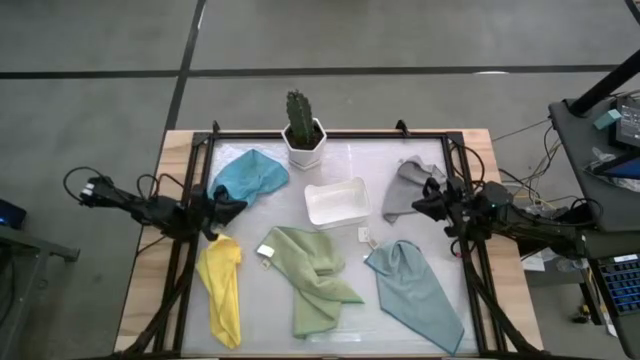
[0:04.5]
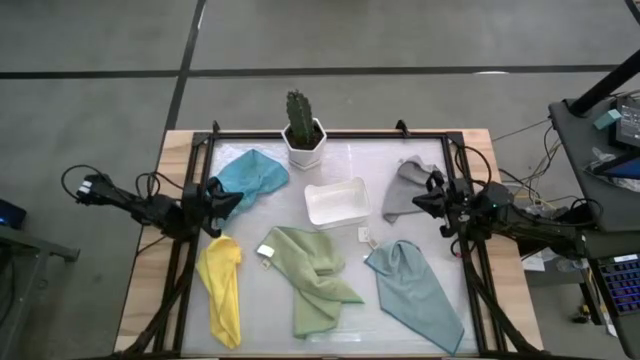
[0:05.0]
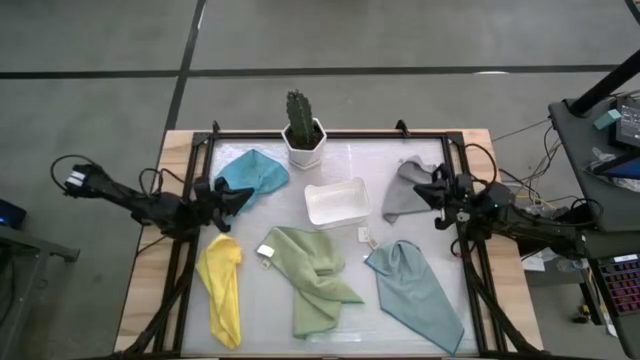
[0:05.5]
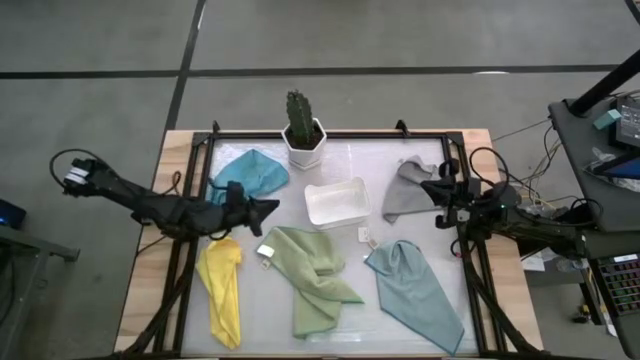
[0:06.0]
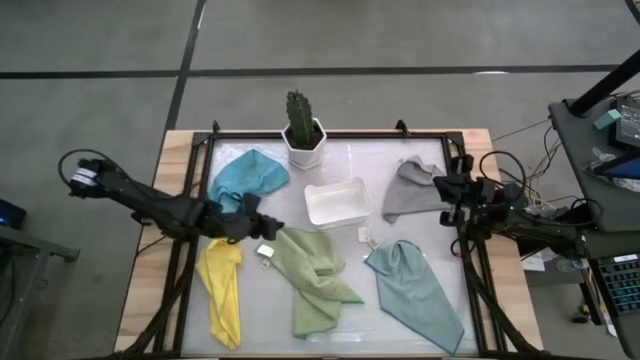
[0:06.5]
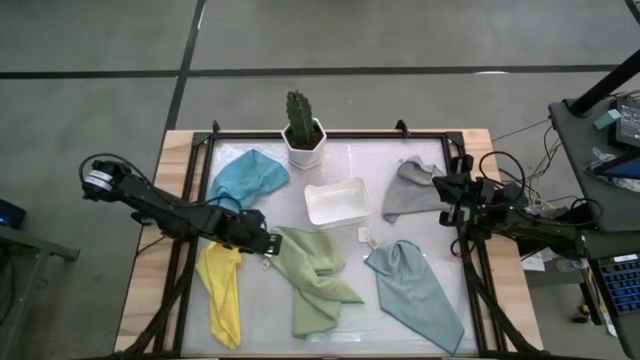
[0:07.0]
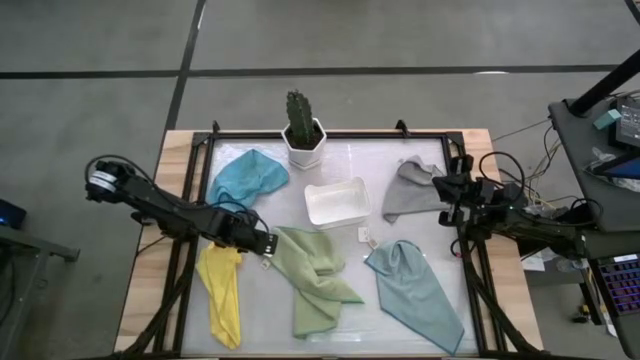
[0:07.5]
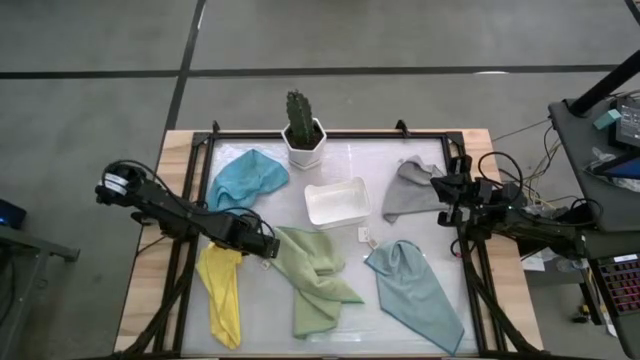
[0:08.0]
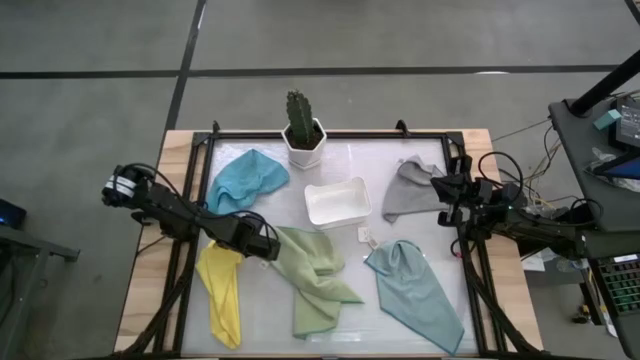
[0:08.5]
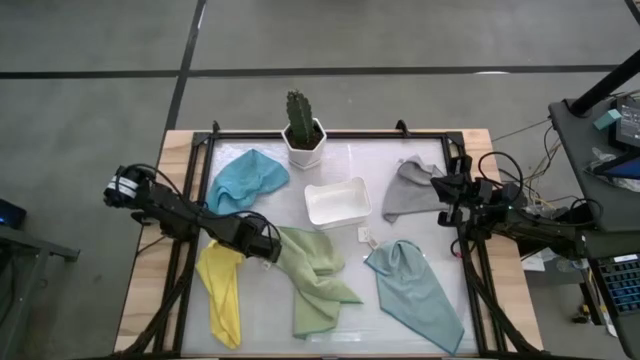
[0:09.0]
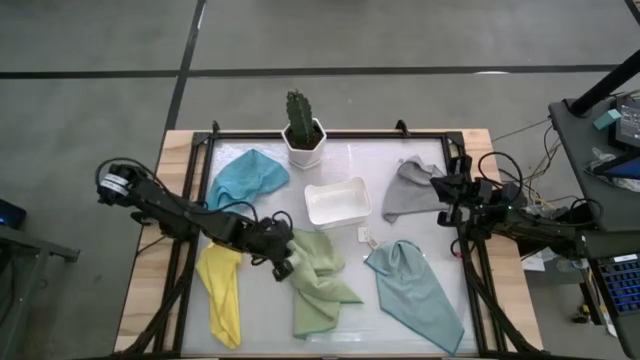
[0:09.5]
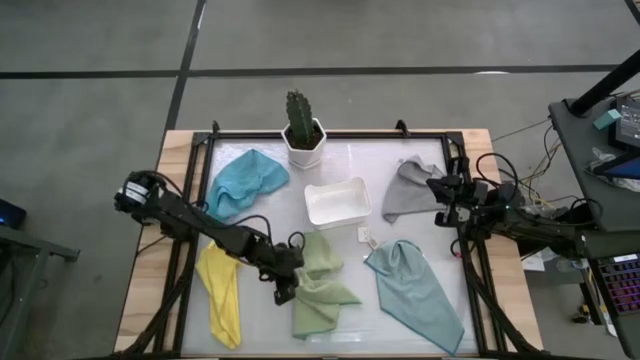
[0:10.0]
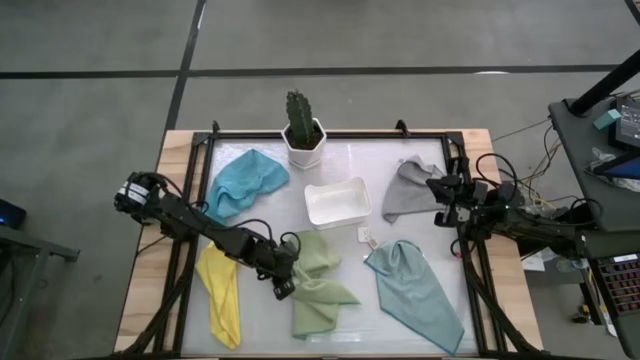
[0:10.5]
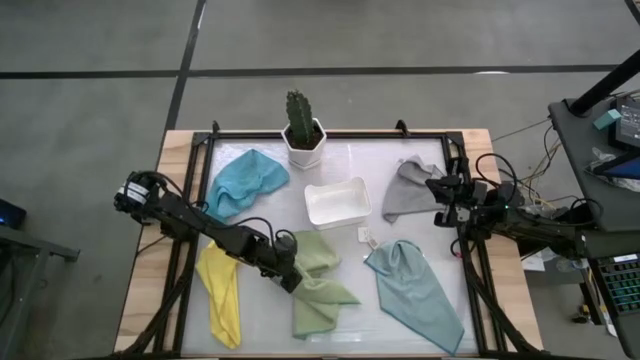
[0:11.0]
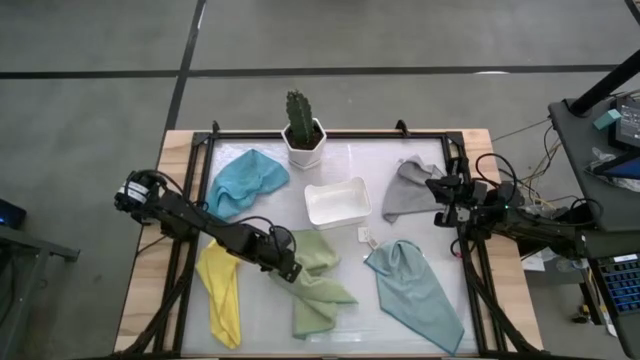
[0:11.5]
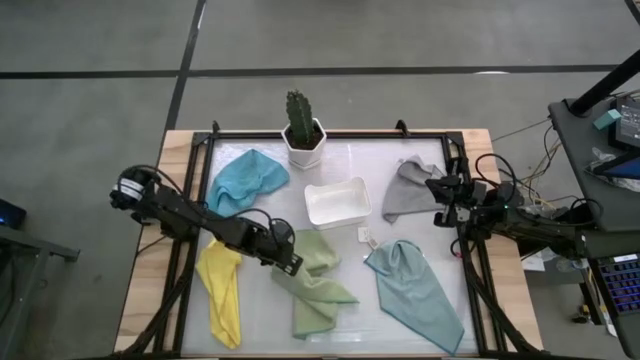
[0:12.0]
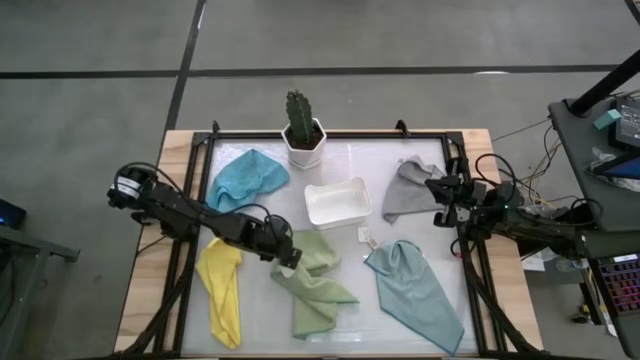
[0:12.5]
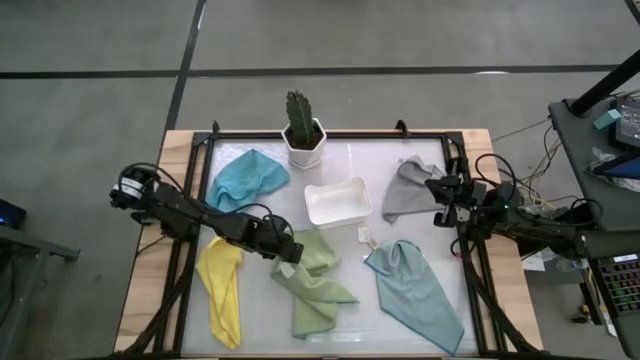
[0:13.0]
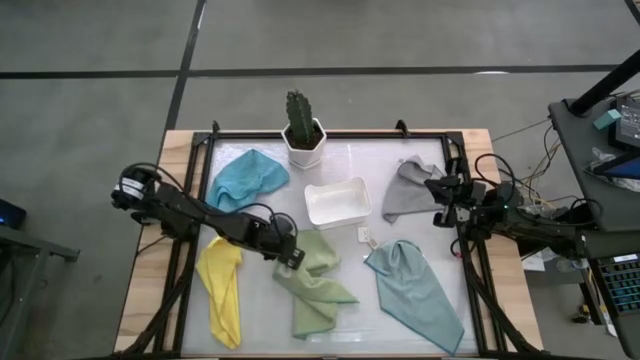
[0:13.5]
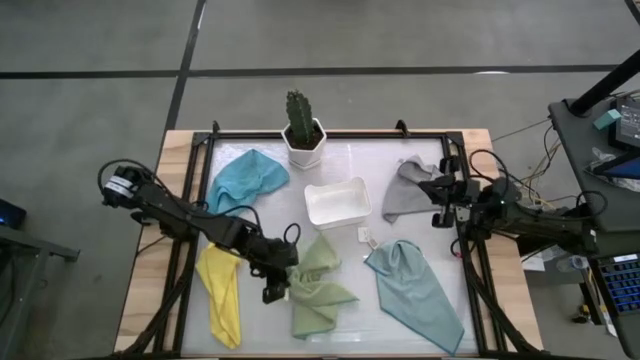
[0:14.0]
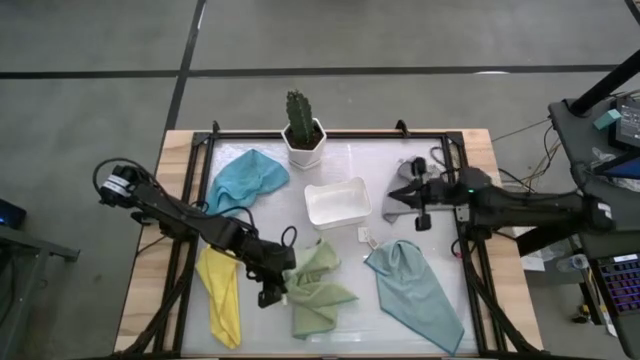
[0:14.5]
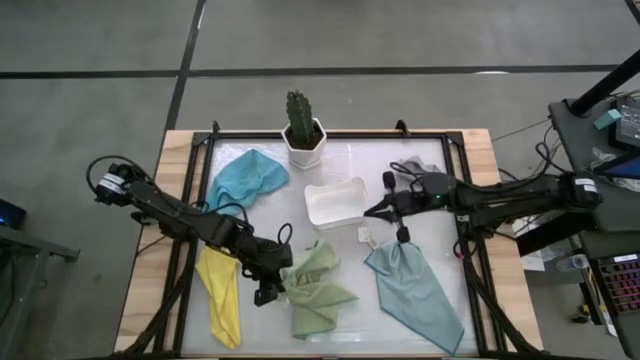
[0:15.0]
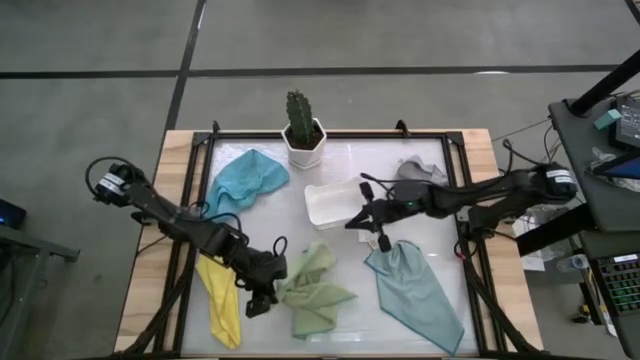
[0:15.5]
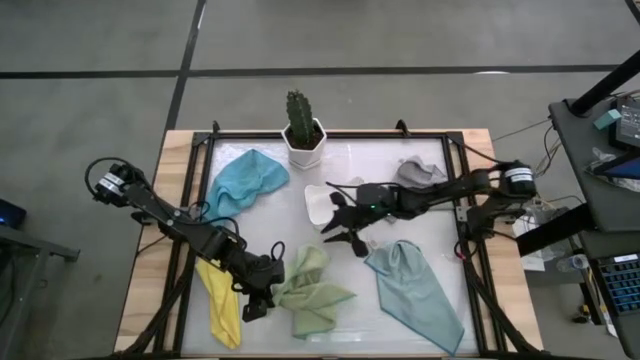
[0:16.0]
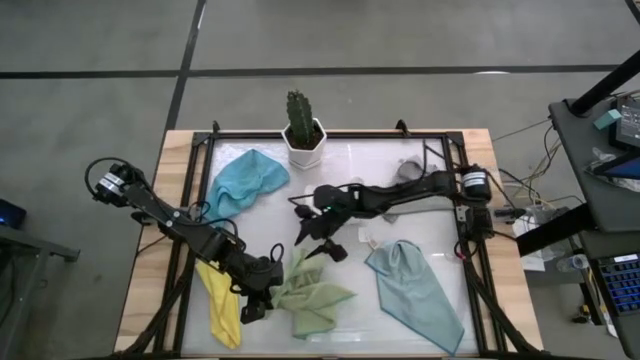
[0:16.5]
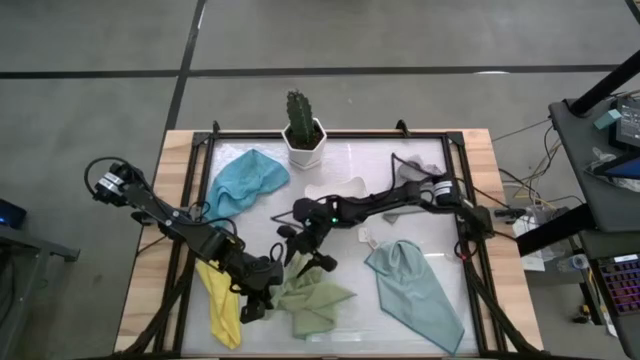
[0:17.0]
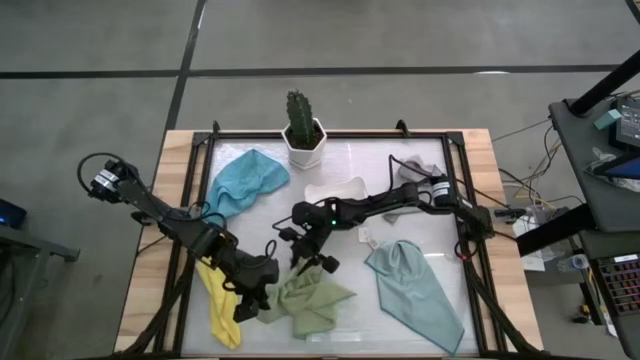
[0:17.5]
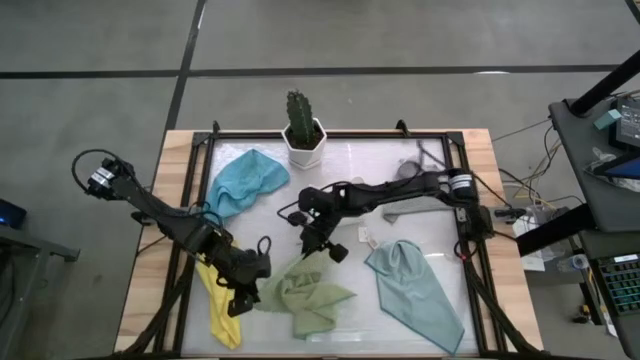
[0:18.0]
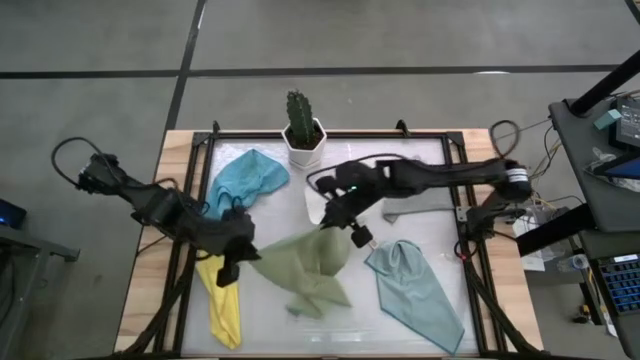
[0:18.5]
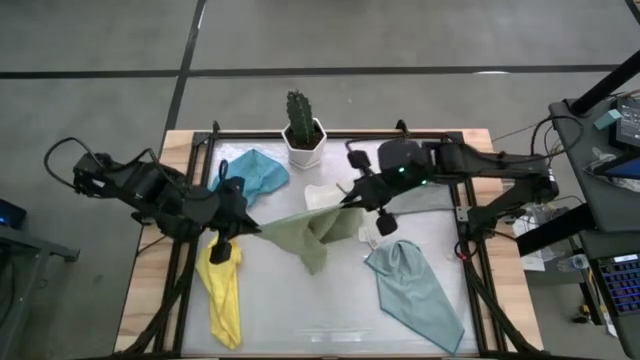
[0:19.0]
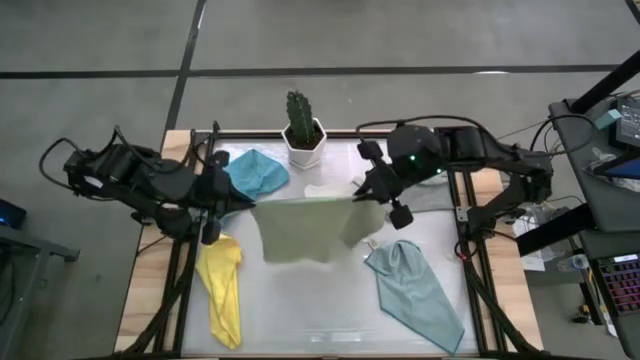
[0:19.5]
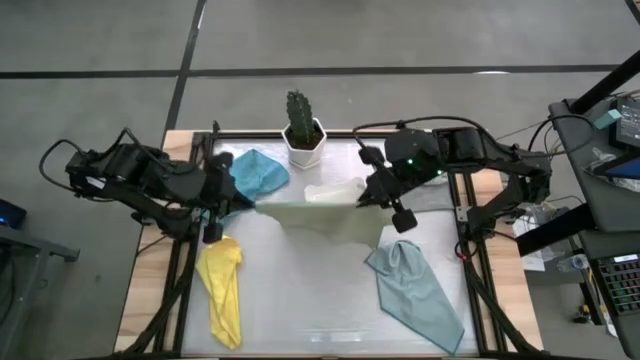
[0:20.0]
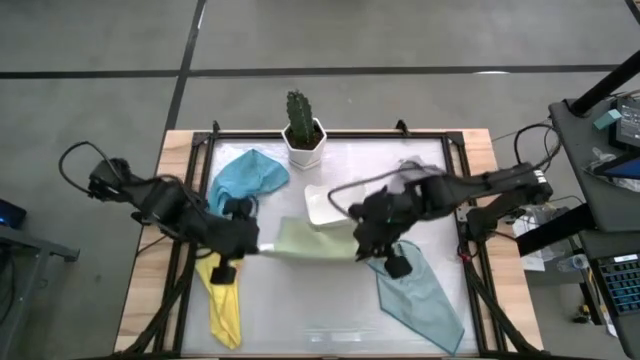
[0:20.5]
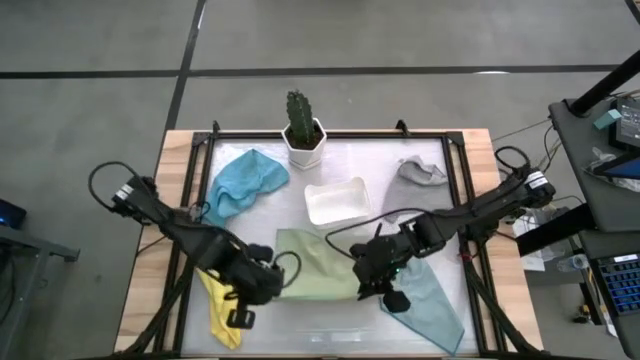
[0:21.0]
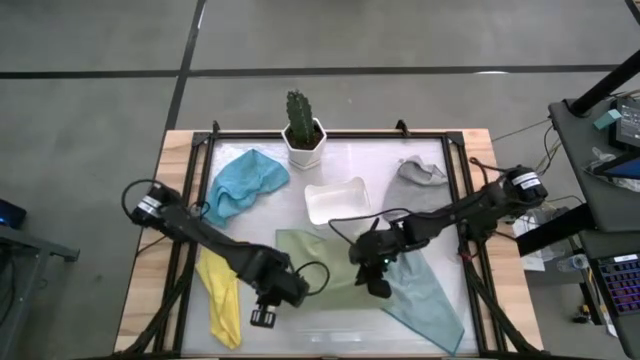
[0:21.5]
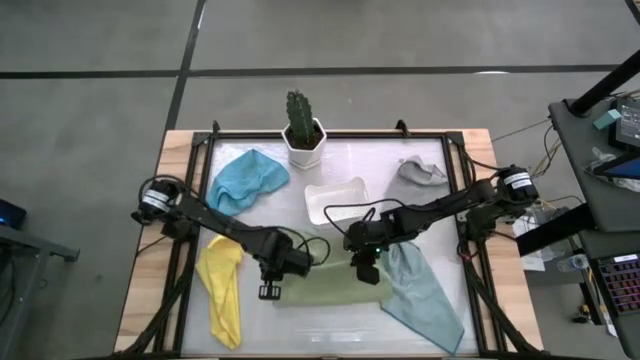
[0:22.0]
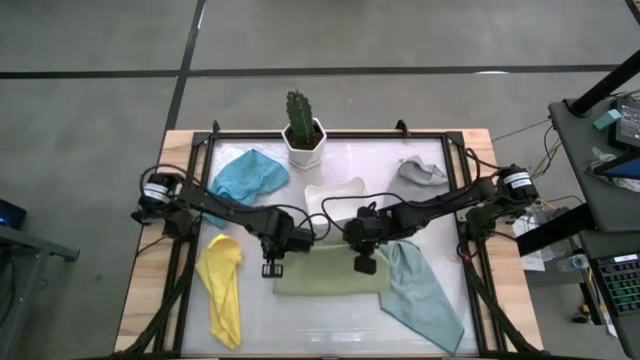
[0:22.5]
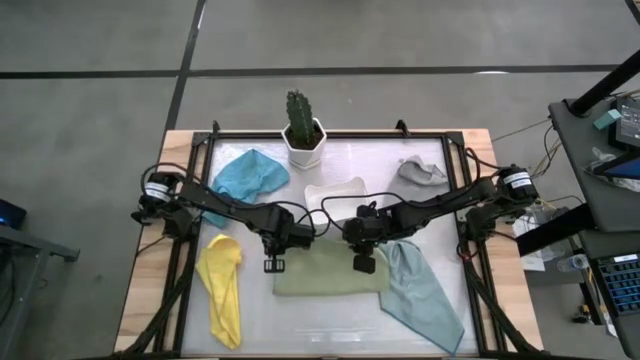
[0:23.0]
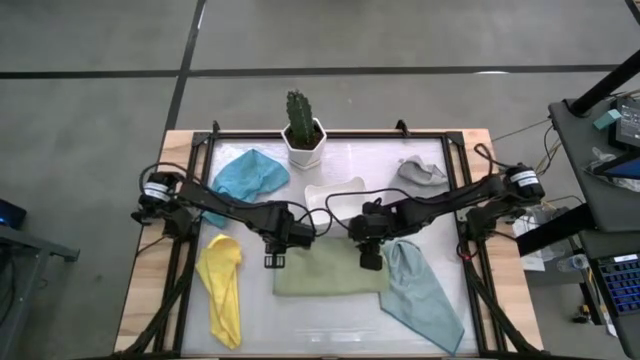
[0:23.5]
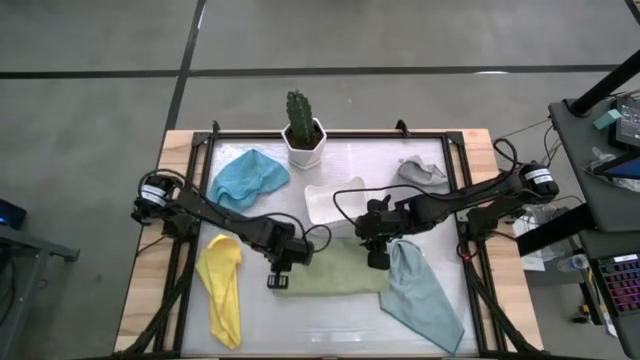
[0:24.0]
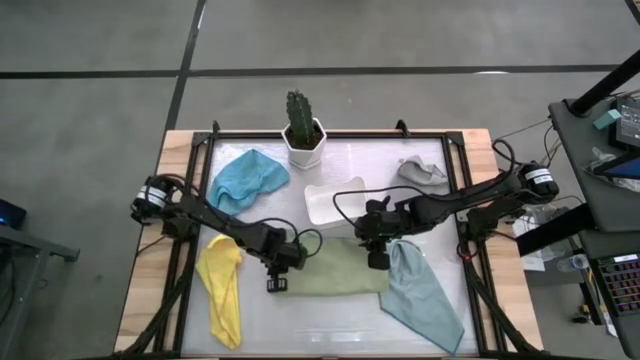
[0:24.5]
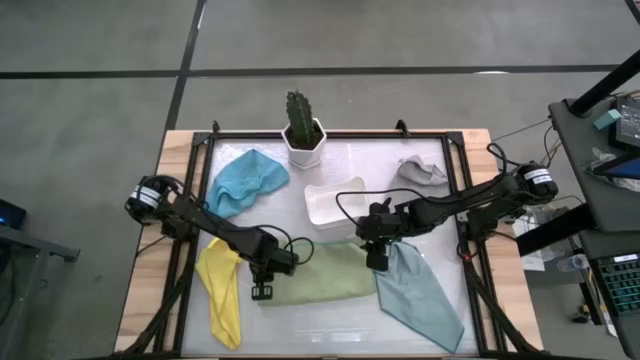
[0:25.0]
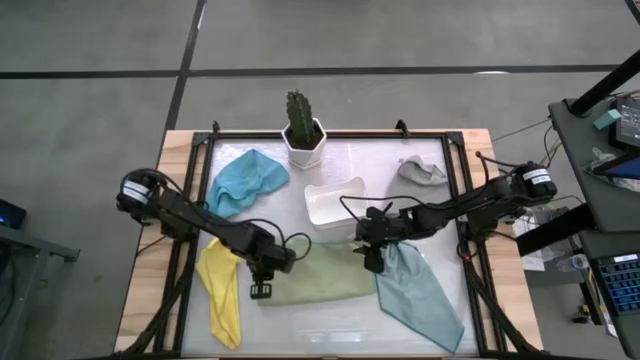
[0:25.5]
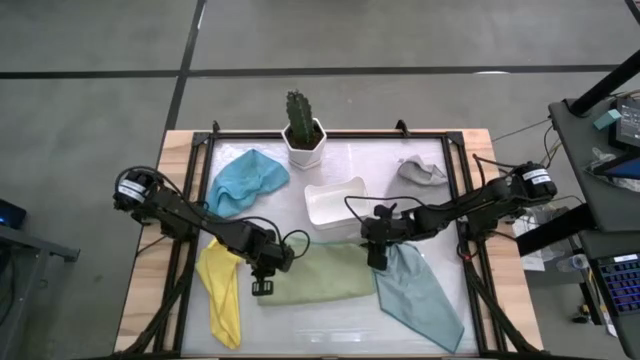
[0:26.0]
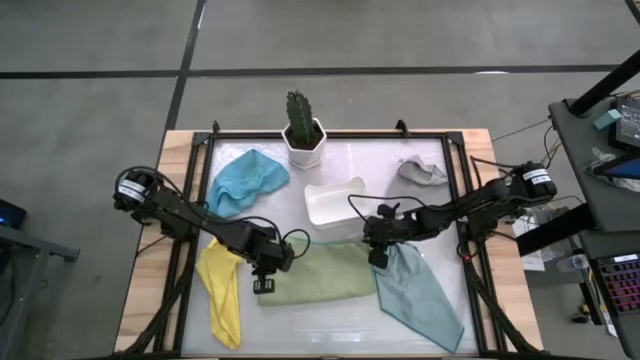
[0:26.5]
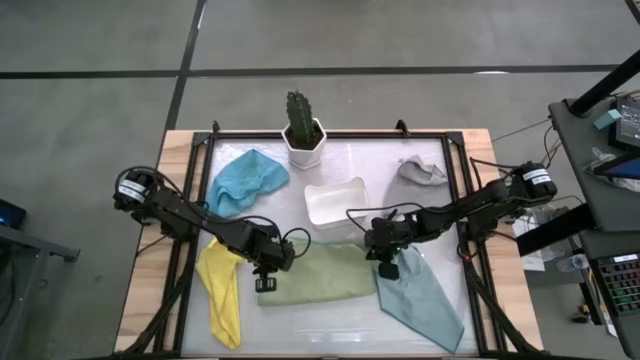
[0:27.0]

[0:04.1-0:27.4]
Task: Fold microfiber towels
Fold the green towel
